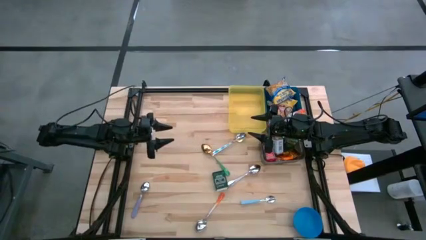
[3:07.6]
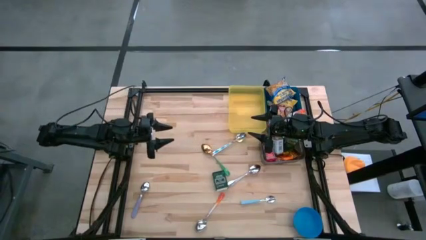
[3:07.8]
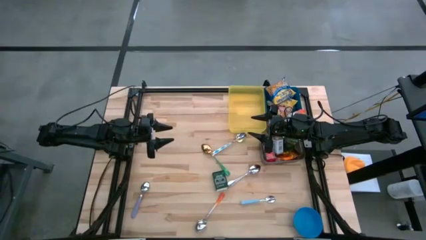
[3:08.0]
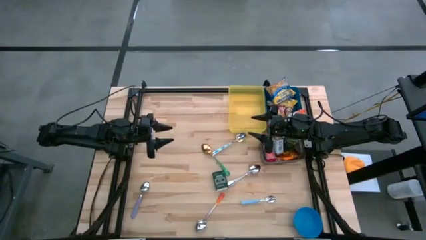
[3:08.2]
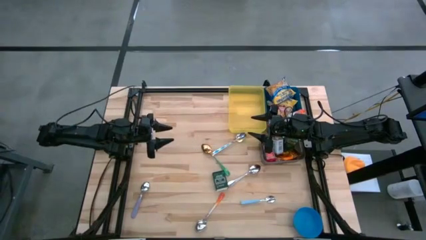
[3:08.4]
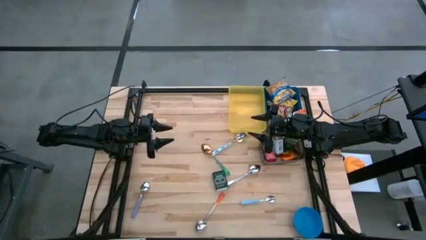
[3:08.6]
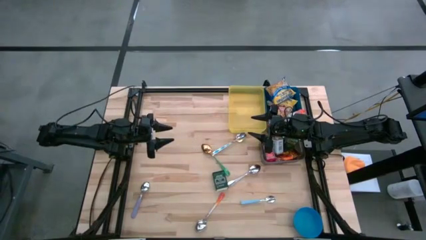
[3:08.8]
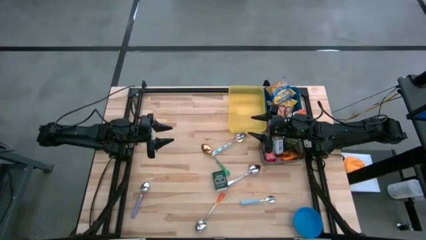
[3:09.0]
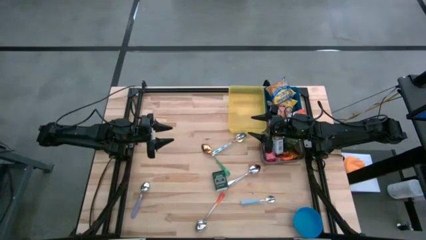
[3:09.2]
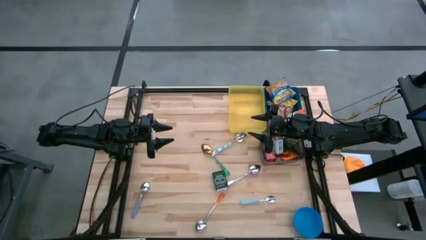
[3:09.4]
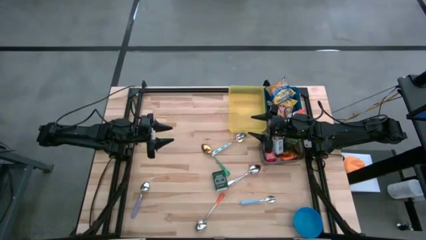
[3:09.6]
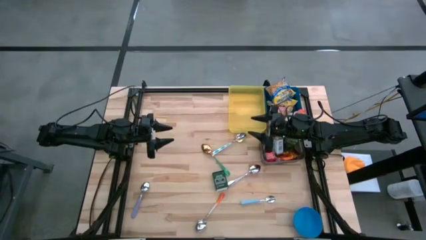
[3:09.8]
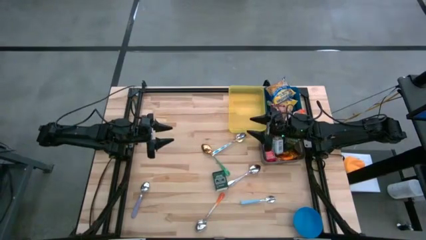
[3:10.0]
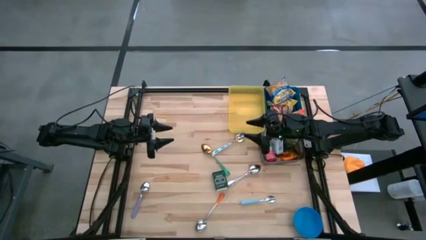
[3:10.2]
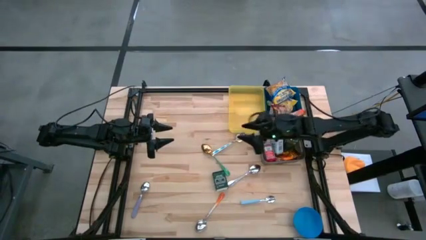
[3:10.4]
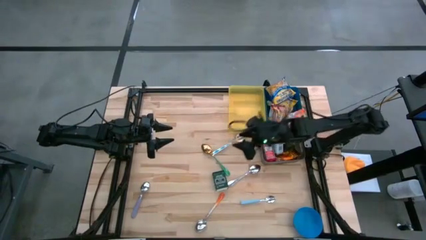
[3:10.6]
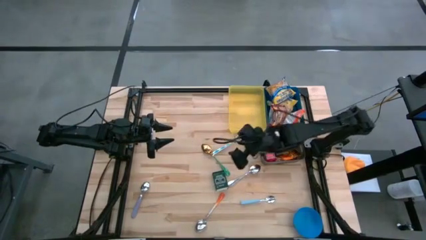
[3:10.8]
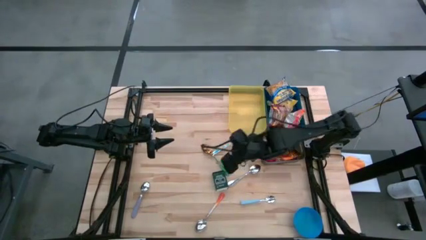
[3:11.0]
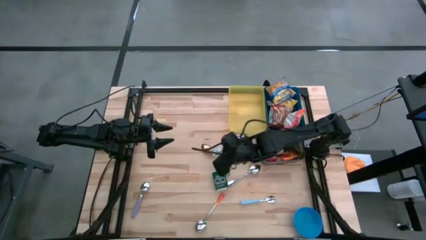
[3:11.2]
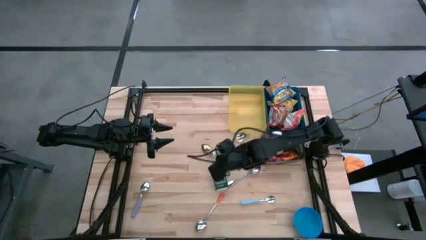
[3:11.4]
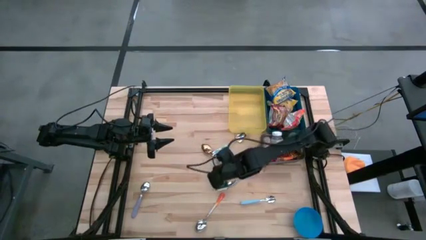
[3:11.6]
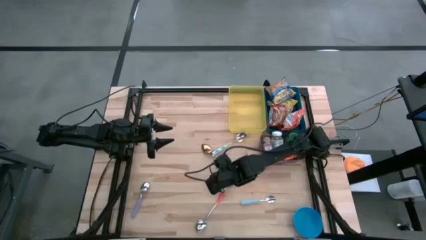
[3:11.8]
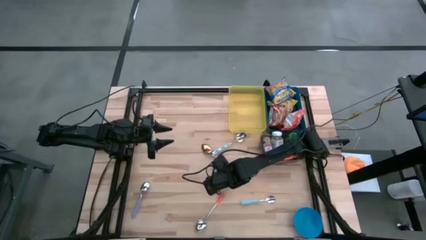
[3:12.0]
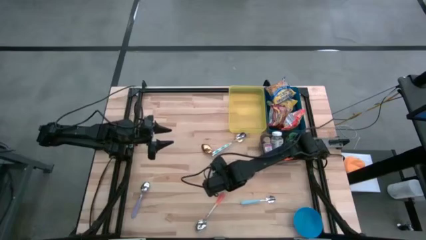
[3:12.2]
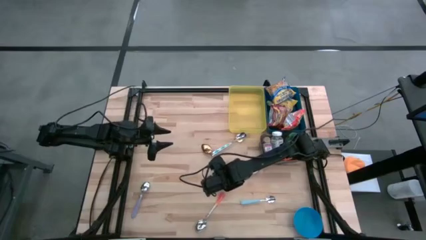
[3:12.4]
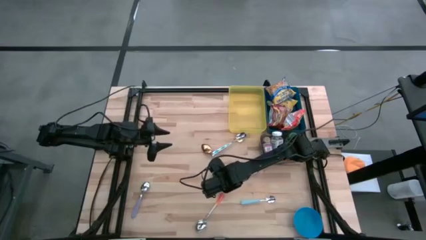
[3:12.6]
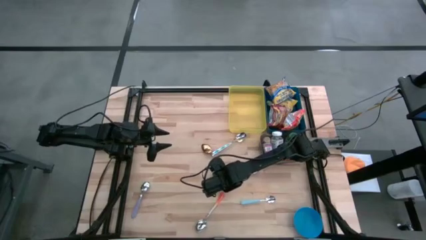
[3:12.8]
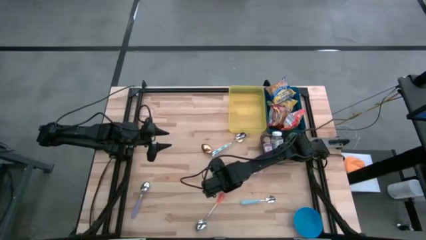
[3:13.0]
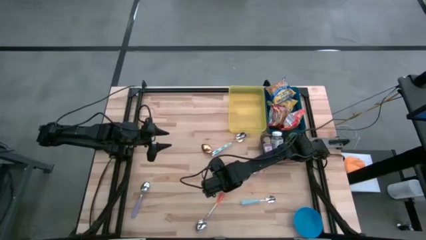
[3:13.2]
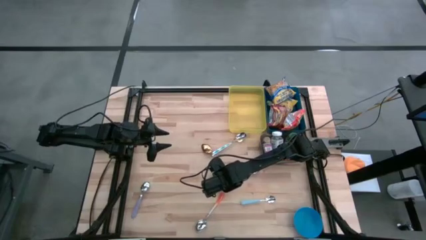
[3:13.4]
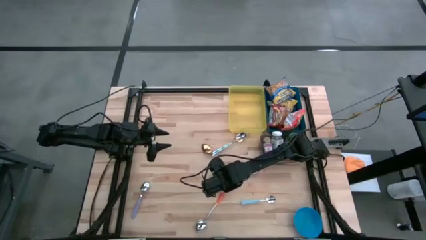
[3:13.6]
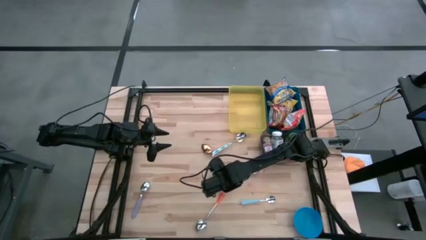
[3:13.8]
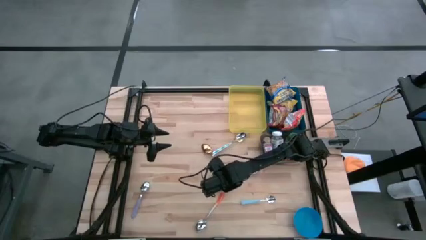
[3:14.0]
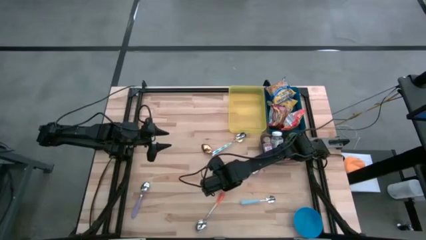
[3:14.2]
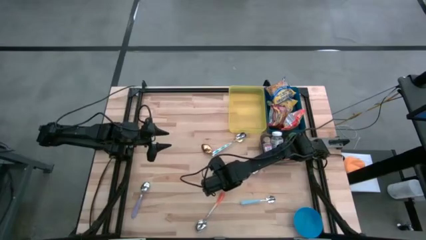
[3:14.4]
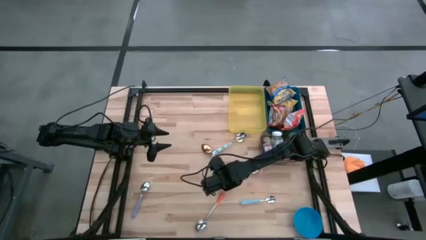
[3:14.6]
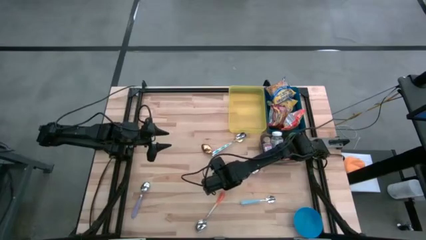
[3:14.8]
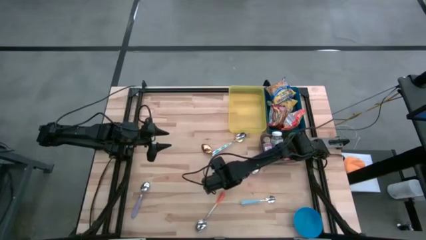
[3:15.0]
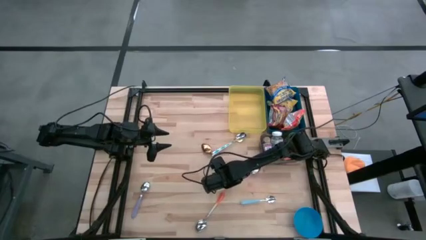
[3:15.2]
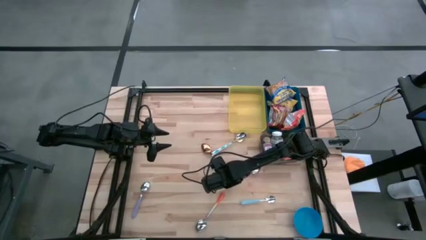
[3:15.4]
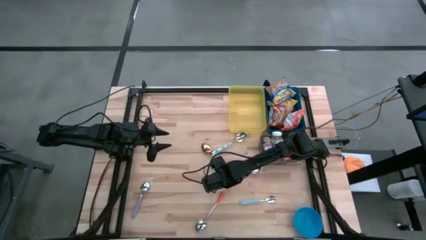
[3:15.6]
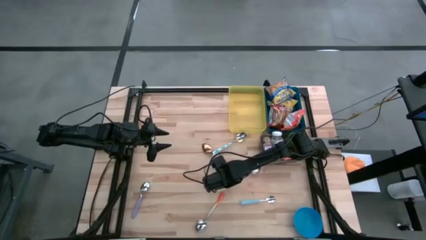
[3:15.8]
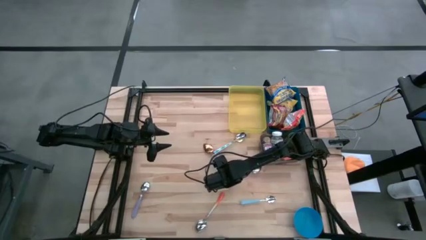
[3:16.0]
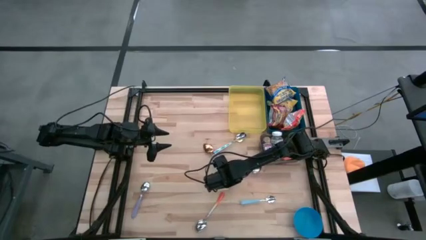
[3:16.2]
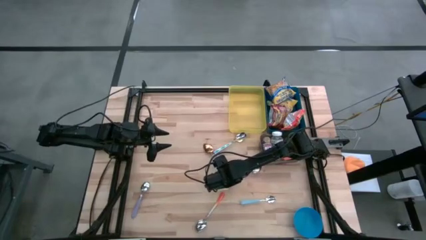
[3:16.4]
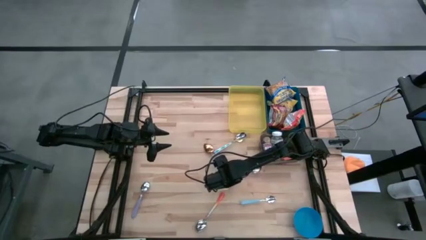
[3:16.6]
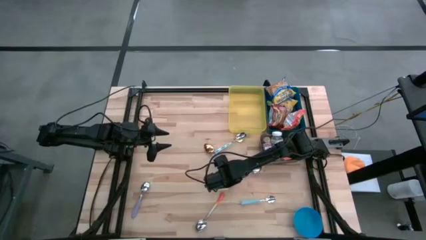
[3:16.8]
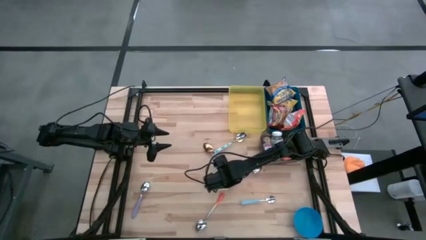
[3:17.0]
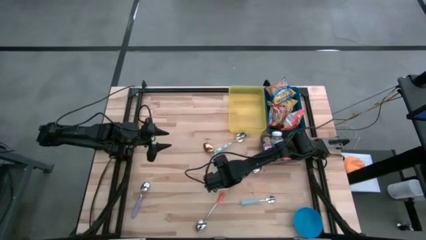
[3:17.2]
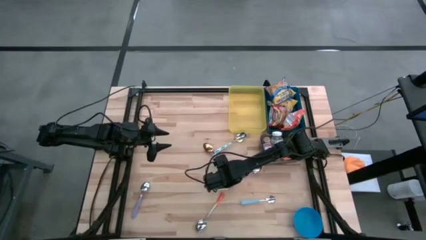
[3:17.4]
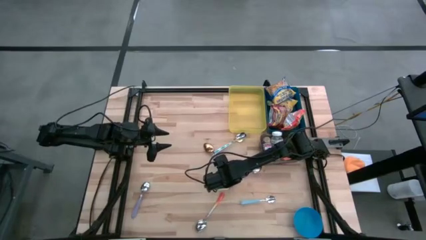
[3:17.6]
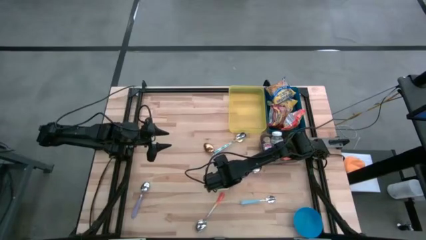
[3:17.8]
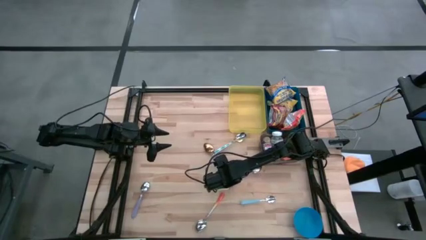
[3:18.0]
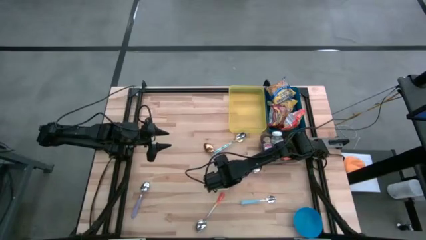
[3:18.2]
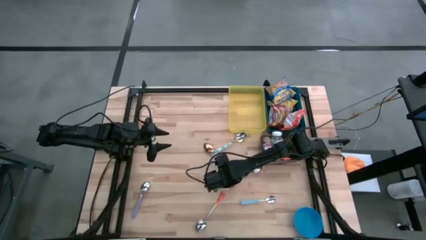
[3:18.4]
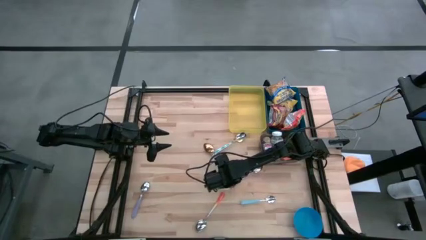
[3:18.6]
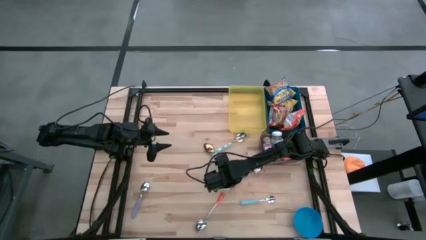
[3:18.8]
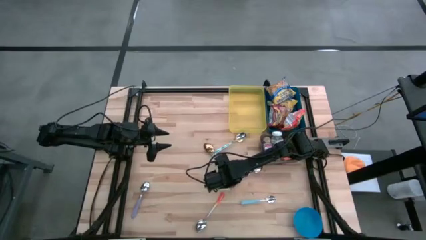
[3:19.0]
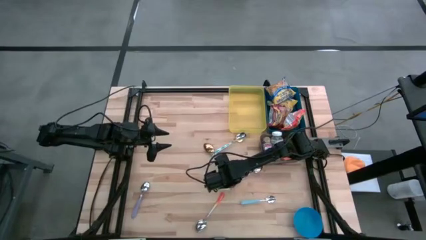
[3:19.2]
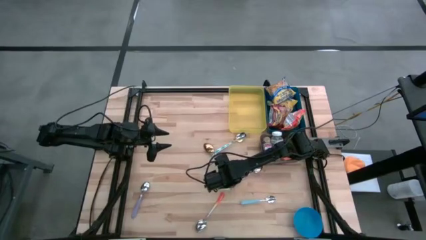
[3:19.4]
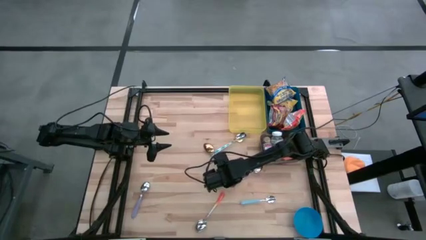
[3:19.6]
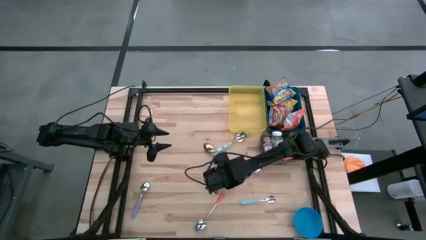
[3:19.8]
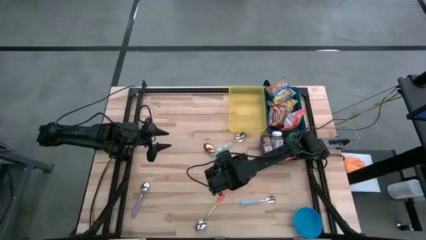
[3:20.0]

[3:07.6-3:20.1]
Put the black seasoning can into the black bin
